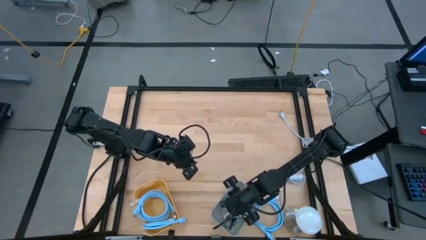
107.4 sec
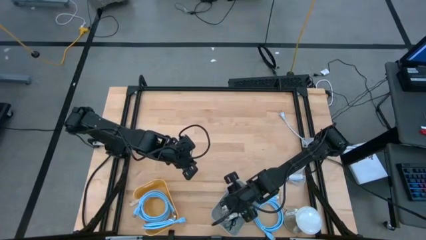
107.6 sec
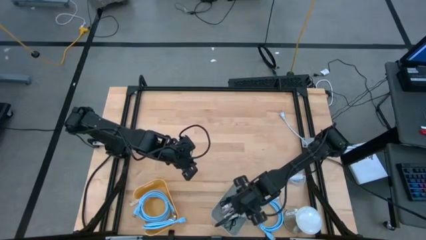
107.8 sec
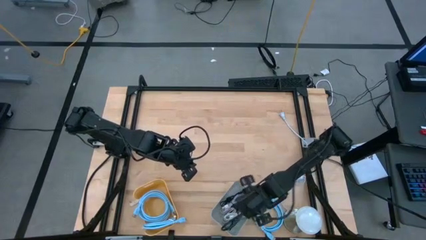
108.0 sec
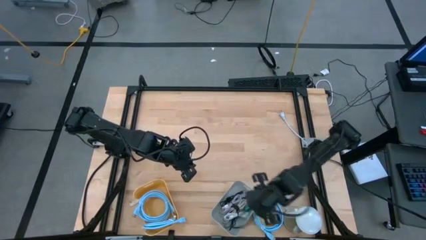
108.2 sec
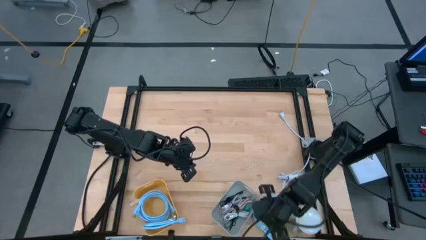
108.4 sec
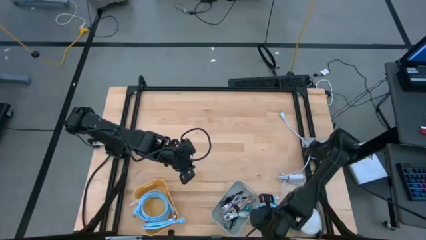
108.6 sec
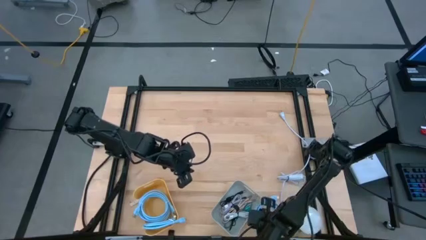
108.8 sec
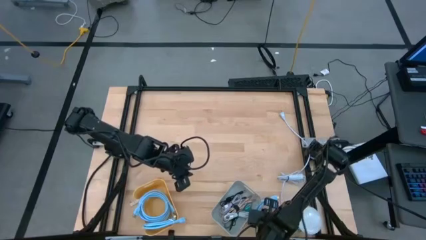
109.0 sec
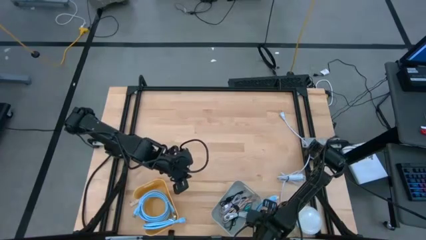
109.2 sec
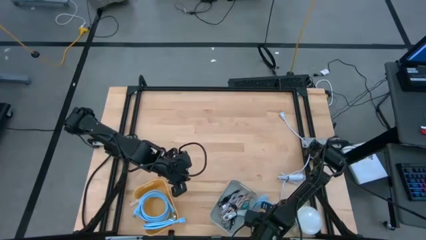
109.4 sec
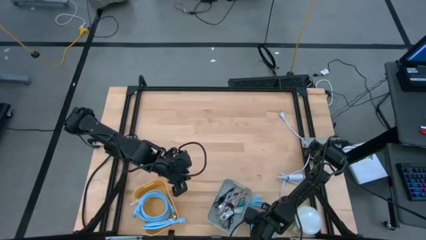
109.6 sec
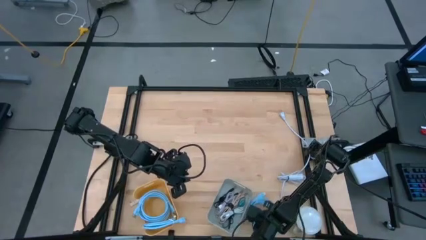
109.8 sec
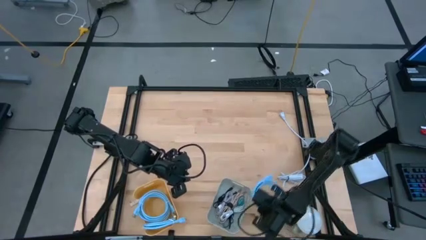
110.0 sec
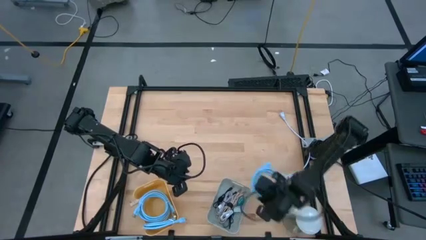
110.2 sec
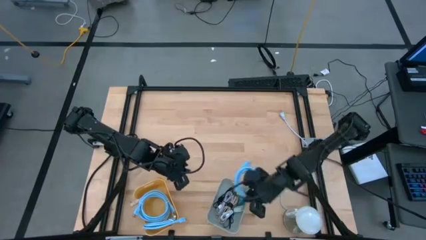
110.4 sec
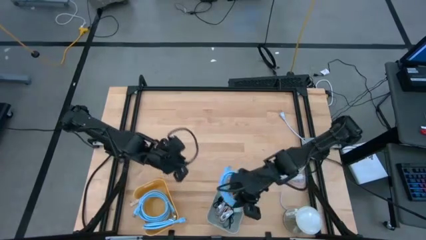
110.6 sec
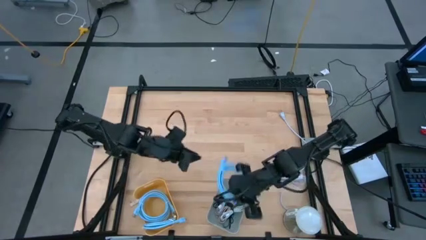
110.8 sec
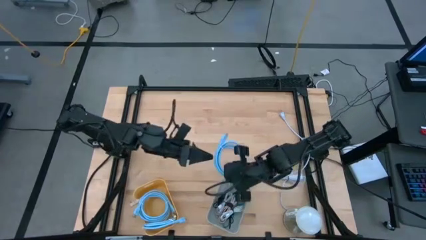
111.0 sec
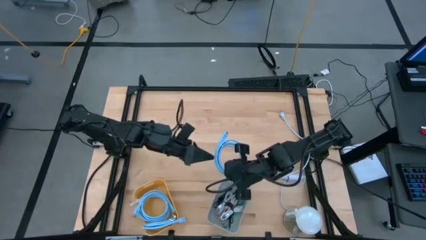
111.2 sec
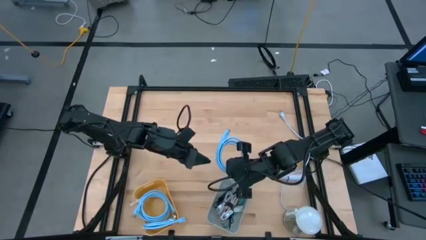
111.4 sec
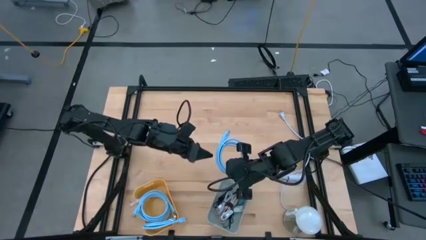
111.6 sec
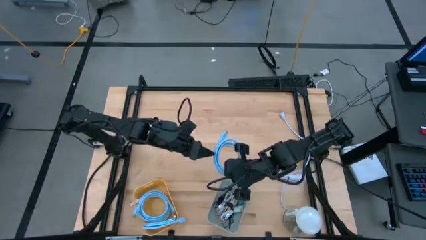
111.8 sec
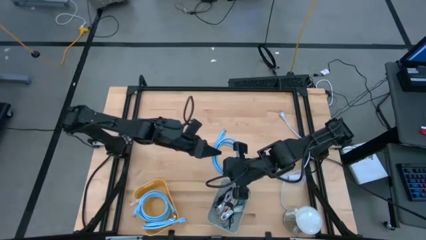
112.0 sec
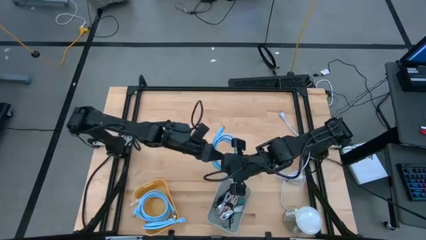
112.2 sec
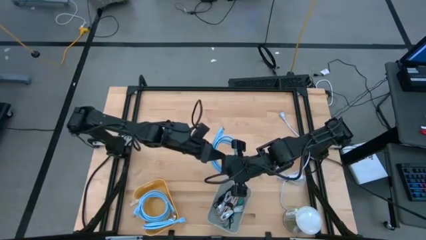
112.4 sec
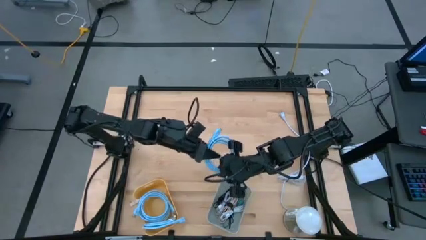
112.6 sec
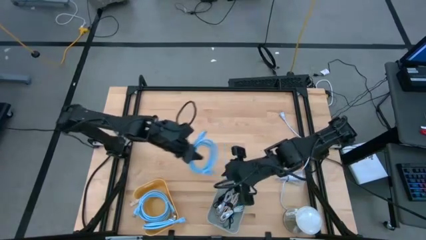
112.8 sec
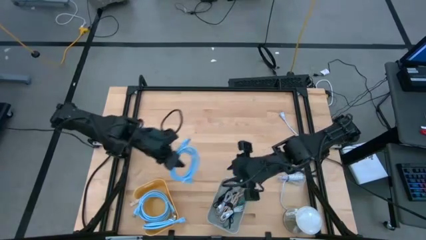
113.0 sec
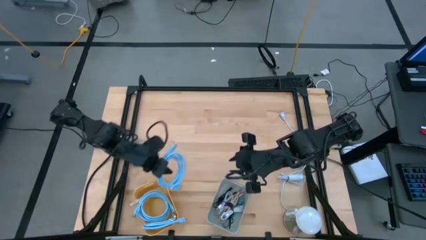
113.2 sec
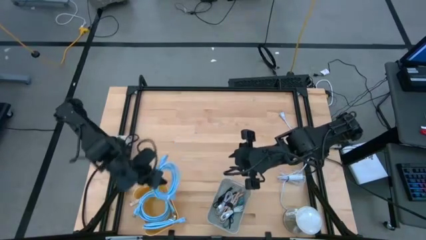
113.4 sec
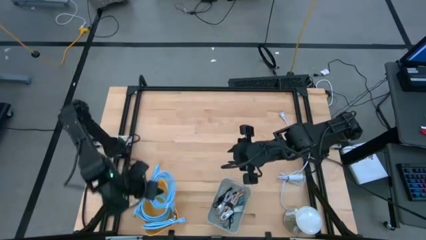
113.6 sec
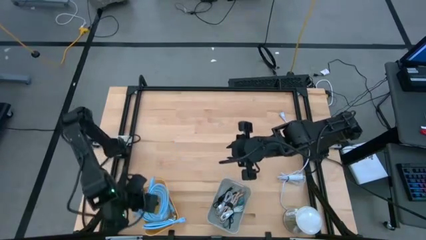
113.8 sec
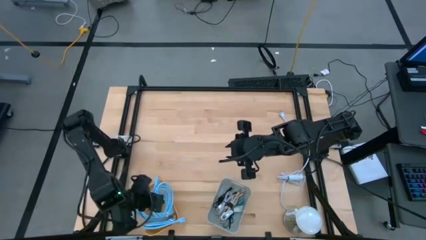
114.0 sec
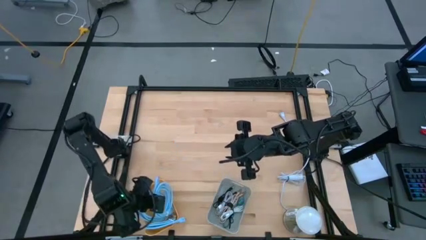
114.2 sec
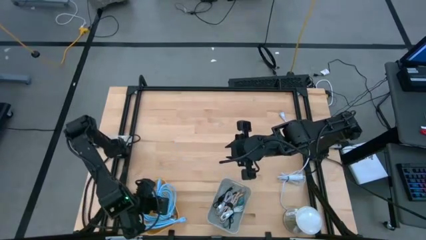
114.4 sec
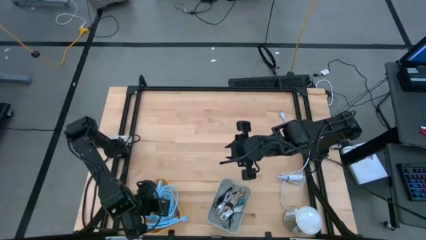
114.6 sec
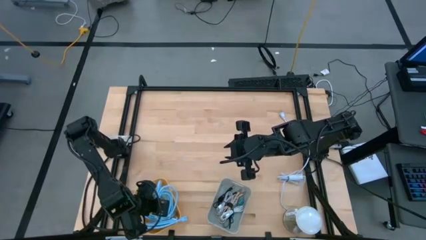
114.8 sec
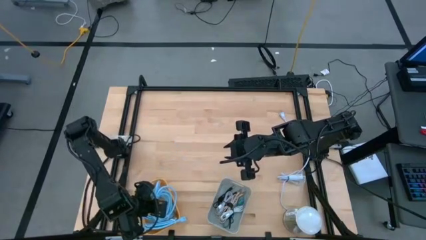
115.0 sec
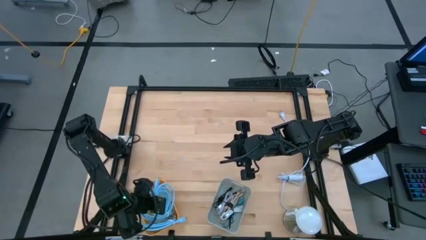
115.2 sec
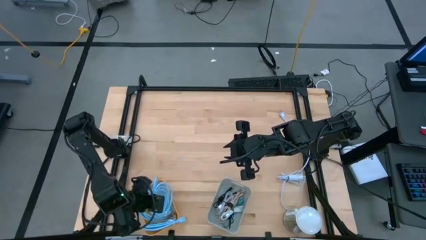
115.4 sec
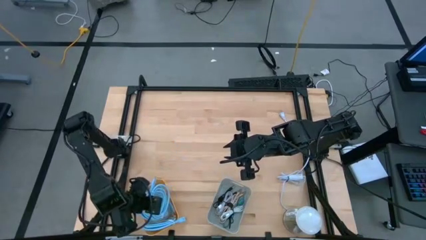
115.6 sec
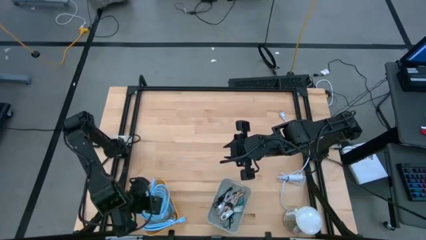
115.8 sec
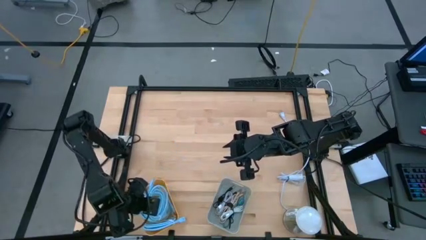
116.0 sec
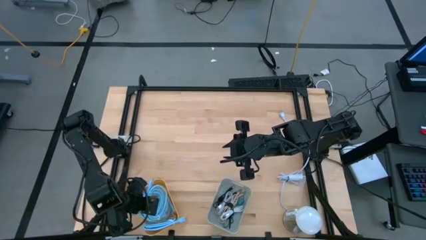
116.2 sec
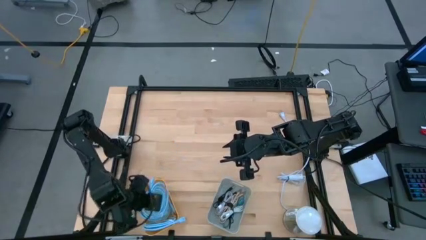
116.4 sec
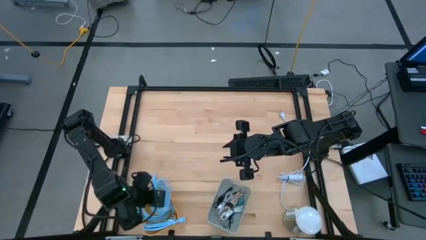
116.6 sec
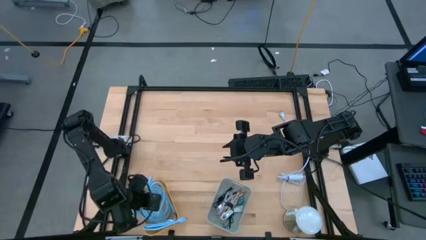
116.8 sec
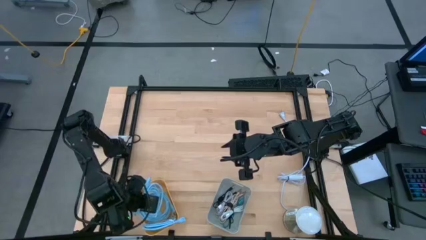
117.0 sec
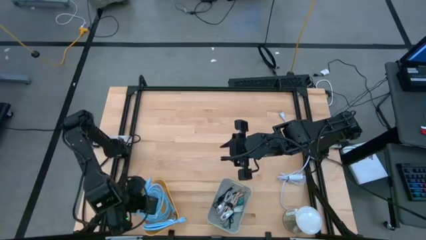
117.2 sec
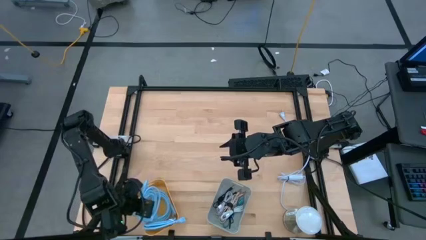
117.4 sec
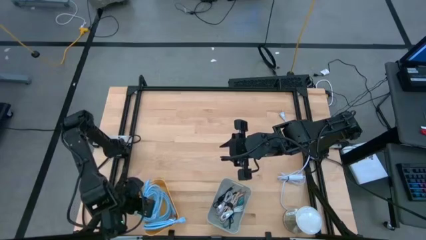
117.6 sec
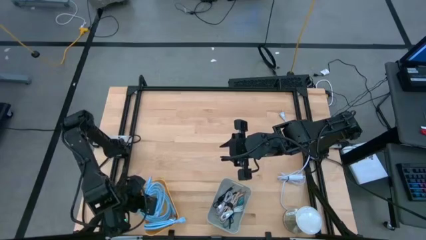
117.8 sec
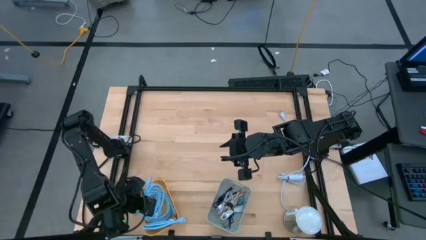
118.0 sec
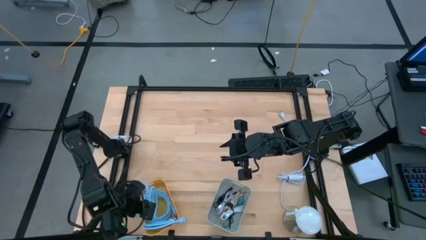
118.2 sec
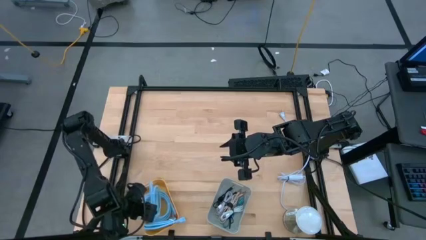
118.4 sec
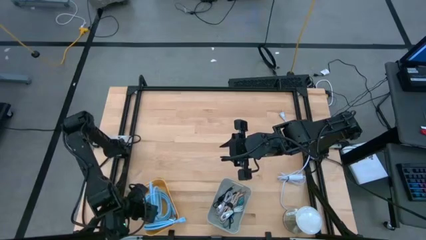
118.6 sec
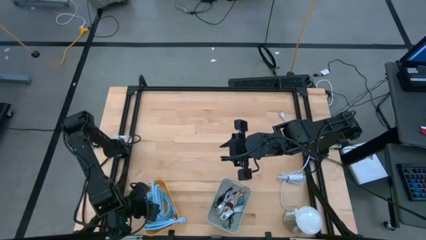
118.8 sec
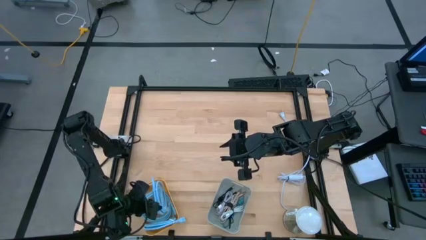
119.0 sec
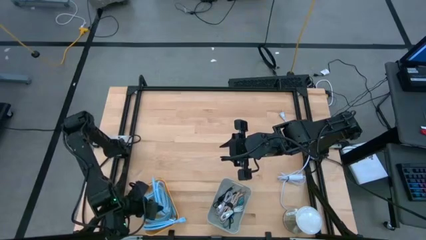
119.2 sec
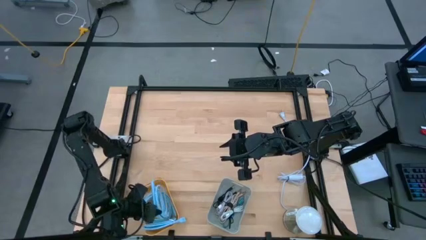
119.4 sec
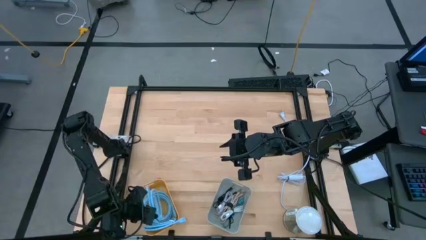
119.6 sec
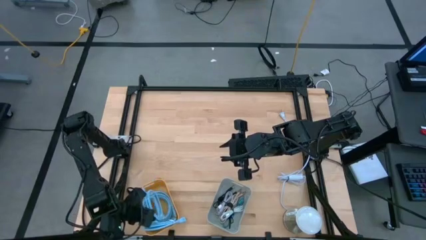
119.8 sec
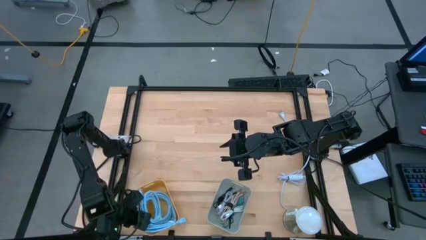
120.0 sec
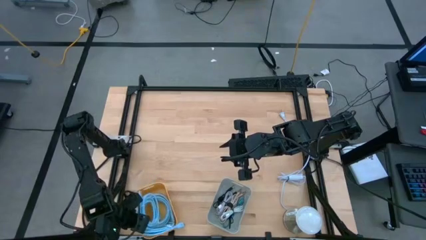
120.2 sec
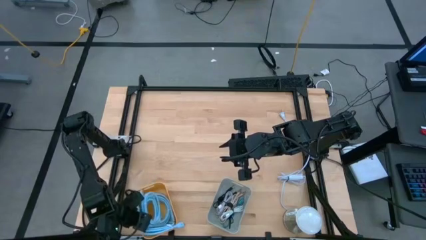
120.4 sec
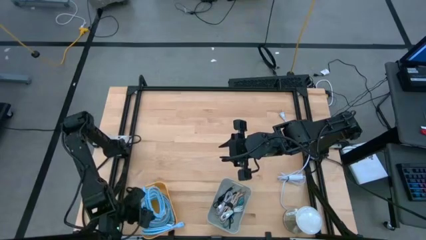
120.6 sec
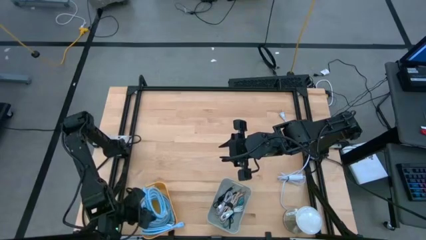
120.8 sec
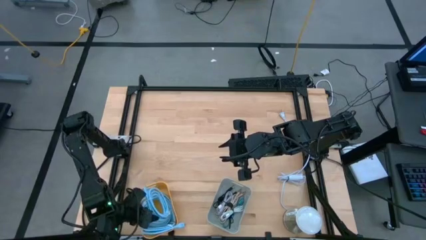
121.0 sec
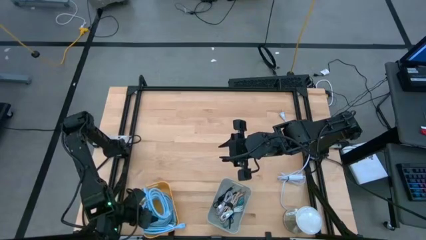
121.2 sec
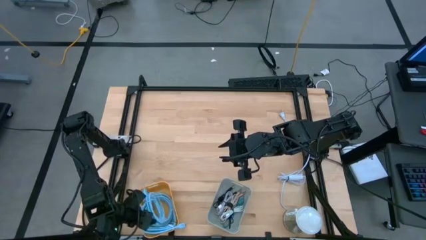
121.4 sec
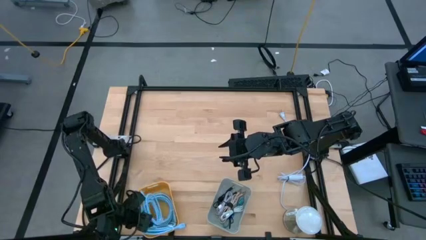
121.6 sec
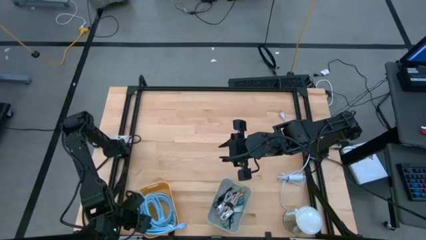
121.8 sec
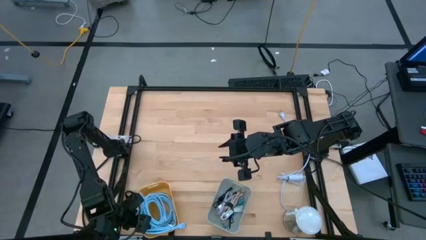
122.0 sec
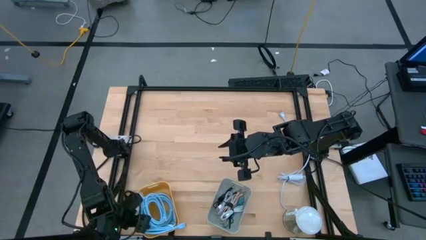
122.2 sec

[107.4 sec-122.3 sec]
Task: Sort cables
Put the blue HDMI cable into the yellow bin
